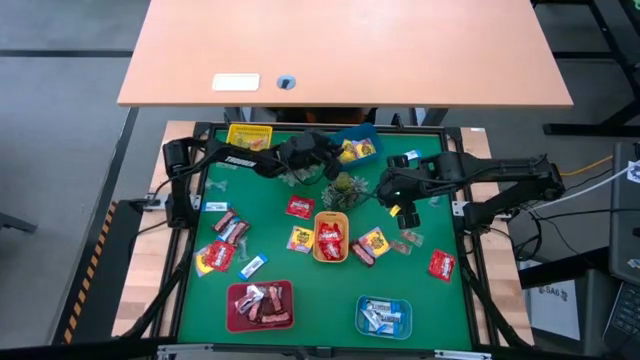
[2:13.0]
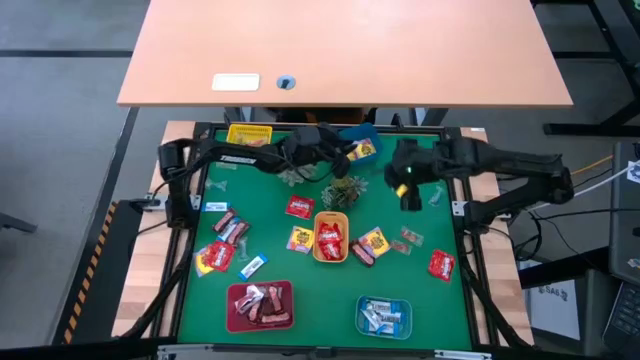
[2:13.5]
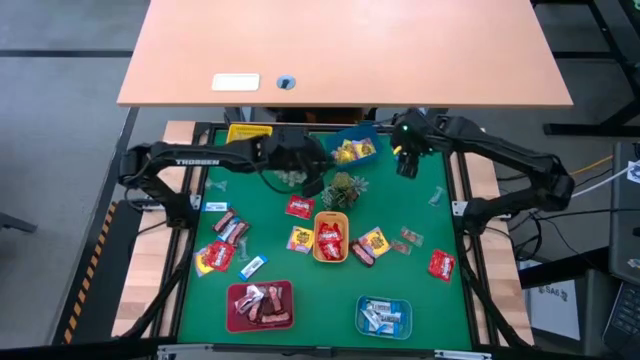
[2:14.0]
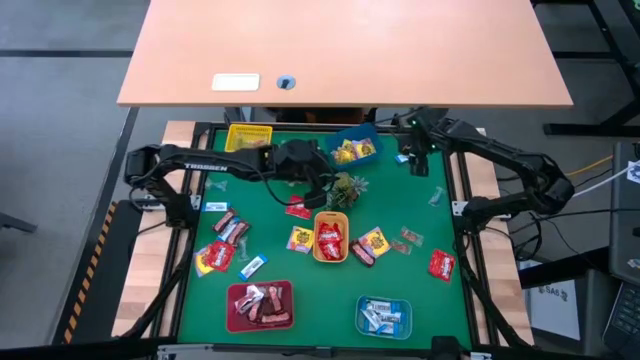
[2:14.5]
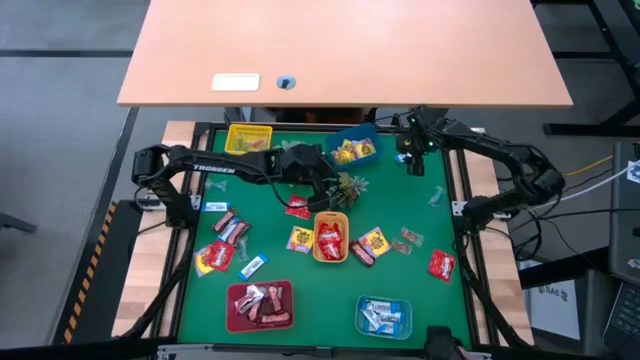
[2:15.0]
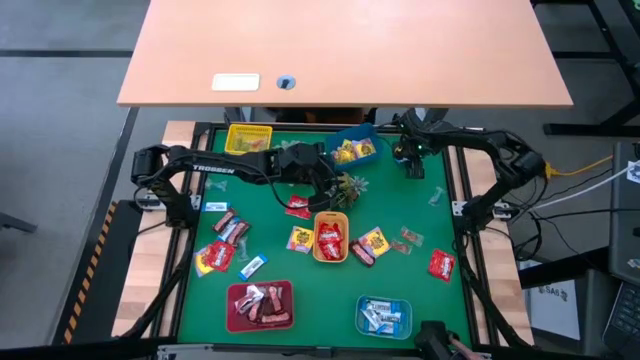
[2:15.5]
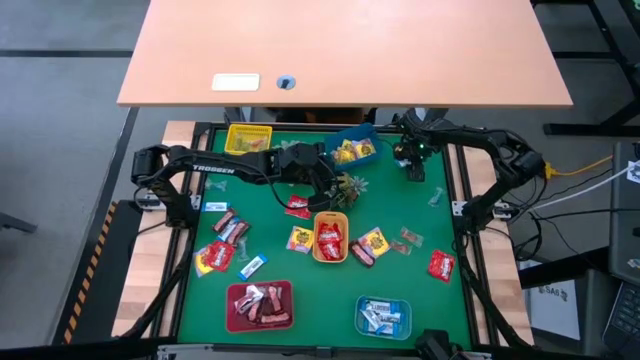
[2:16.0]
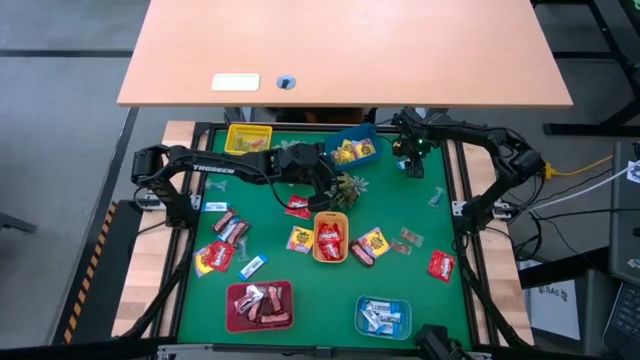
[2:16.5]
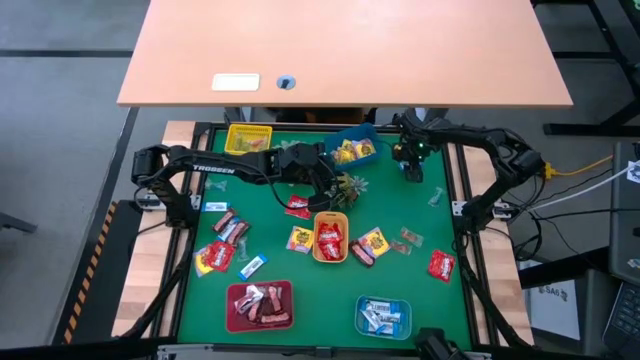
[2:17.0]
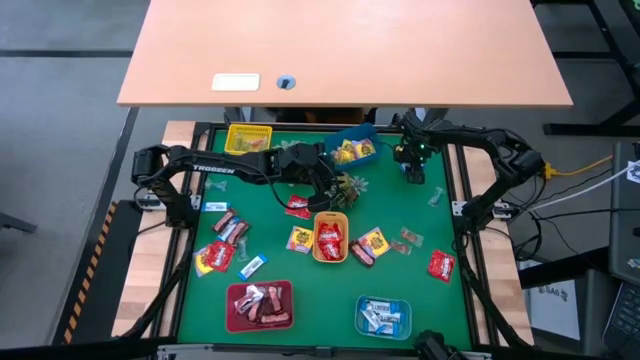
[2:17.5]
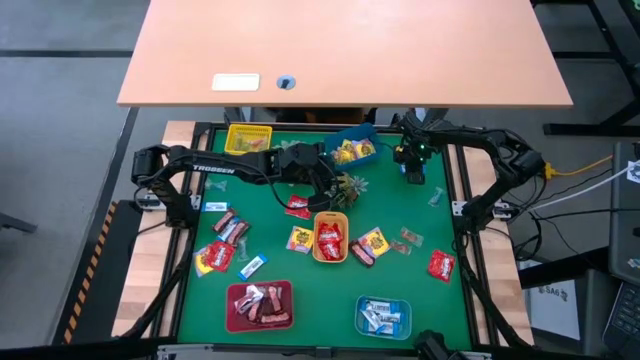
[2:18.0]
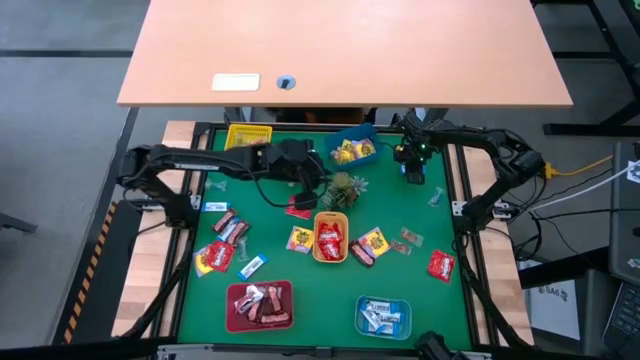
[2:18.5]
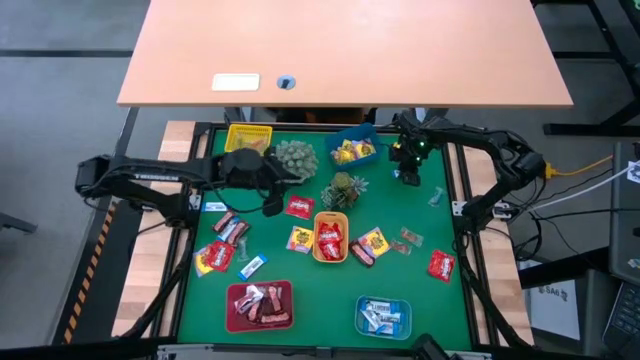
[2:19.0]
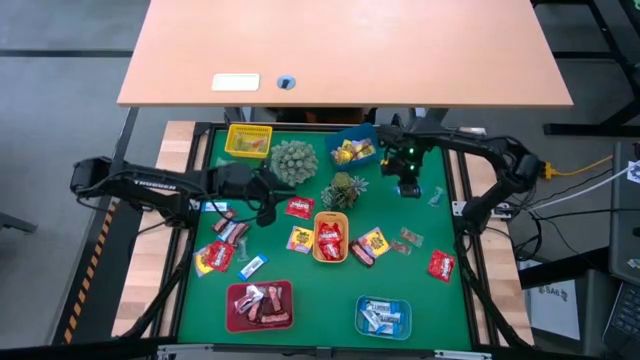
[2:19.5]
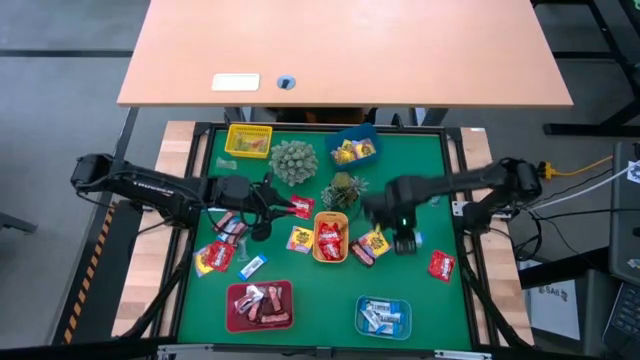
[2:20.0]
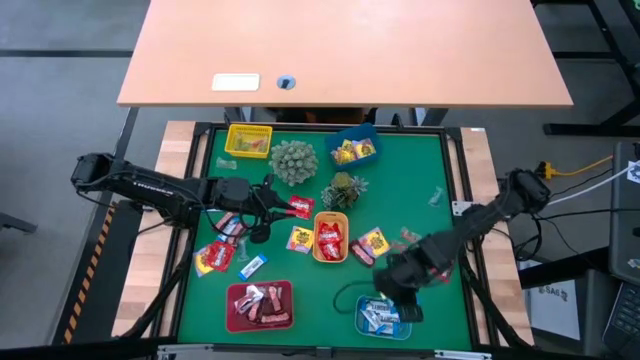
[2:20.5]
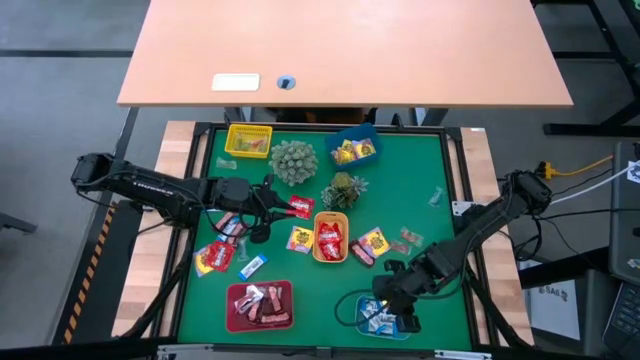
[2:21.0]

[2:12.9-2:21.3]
Task: Sort candy
Put the blue chocolate bar into the light blue bin

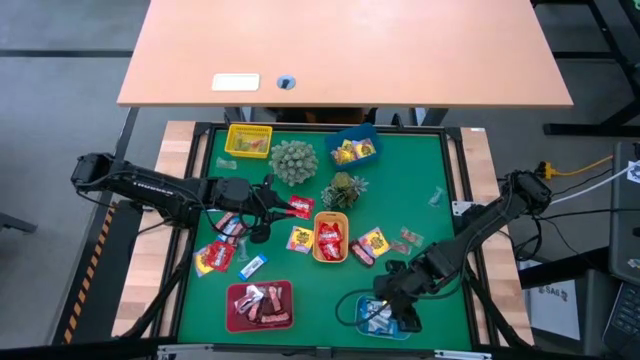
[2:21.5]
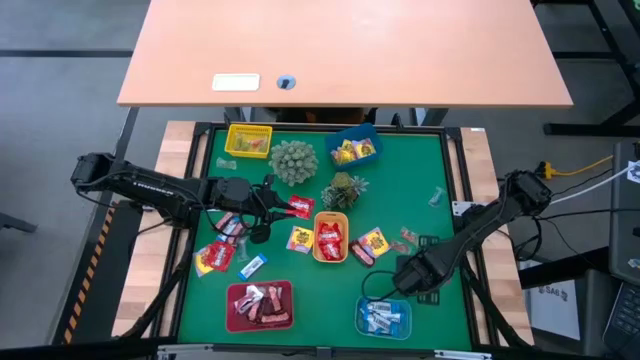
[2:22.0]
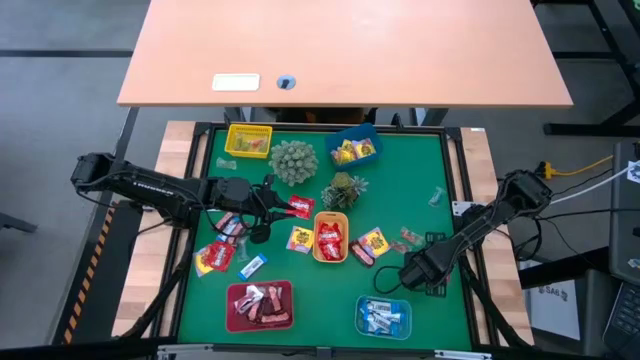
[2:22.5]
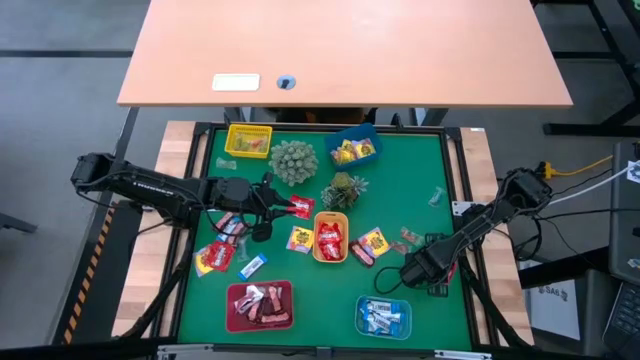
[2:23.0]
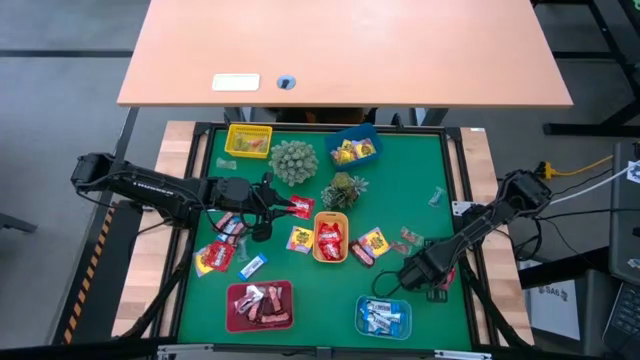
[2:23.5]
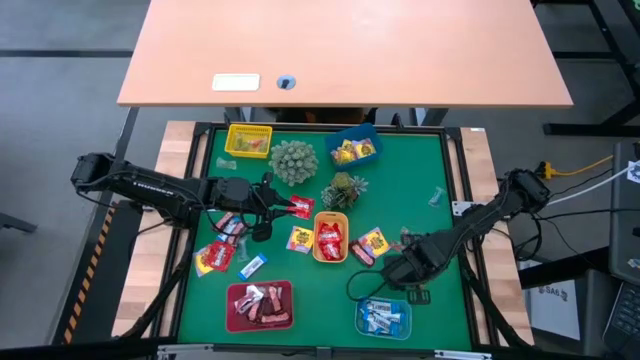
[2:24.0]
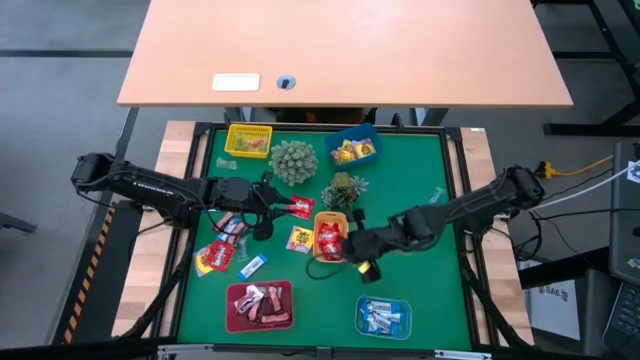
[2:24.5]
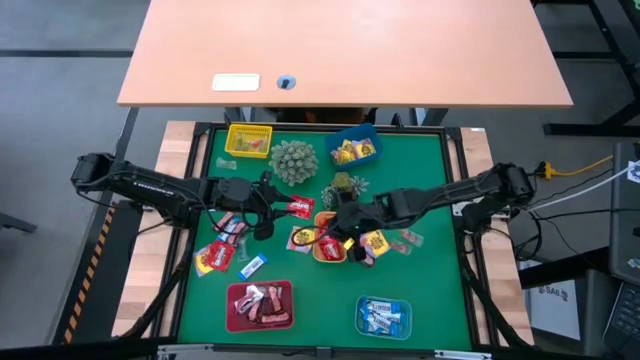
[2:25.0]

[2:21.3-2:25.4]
Put the red candy into the light orange bin

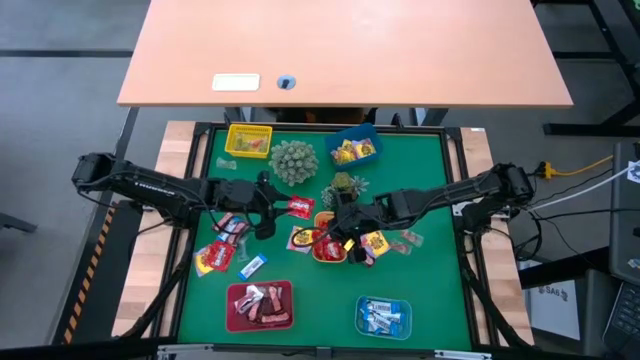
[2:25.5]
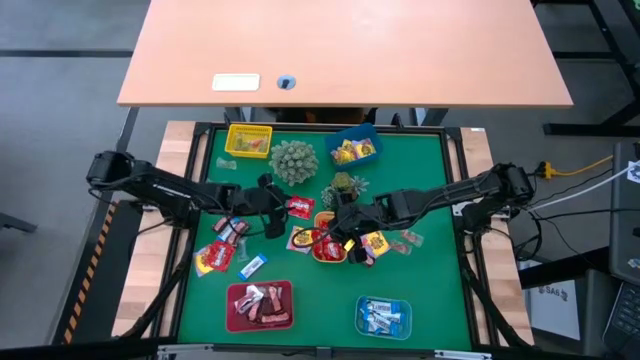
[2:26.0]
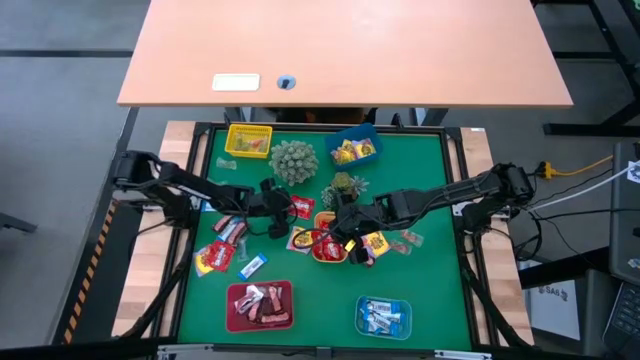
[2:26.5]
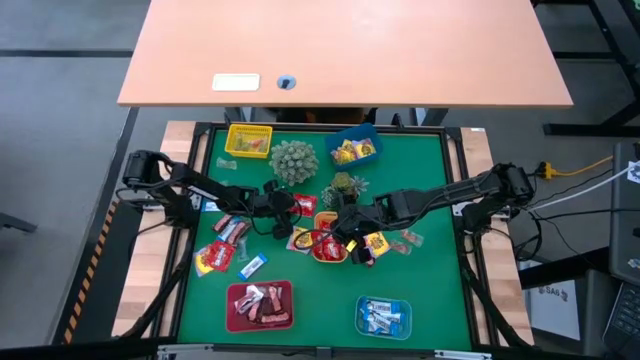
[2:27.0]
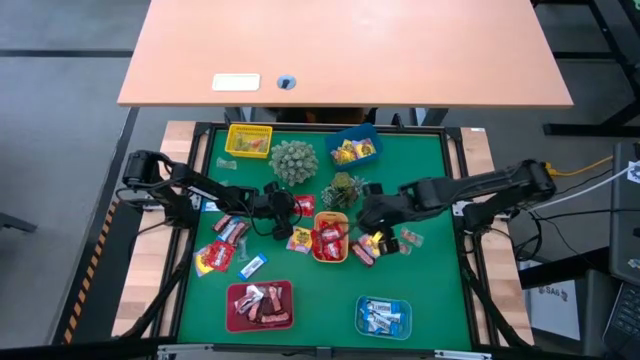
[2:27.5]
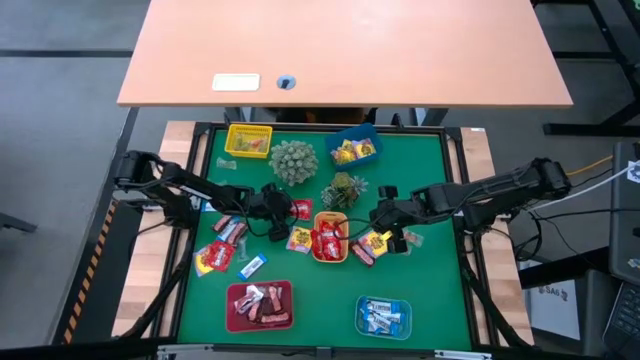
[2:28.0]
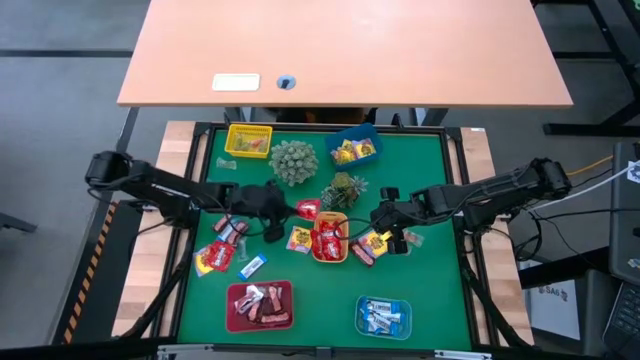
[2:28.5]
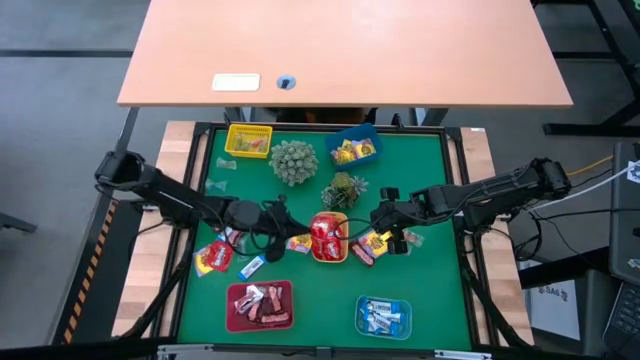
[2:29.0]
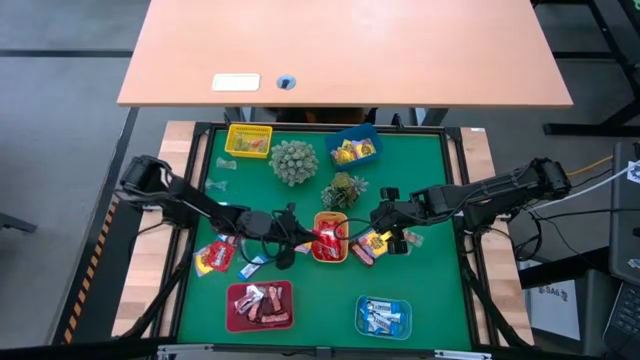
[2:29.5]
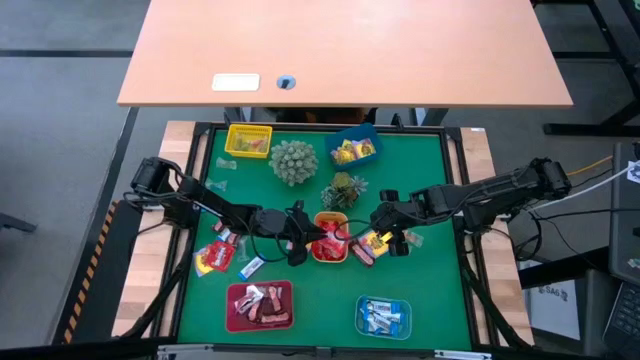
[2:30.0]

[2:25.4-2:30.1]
Put the red candy into the light orange bin

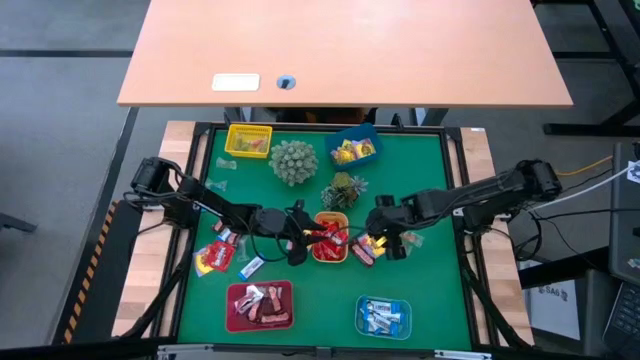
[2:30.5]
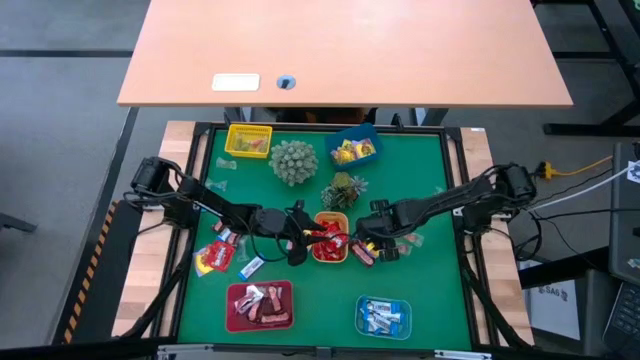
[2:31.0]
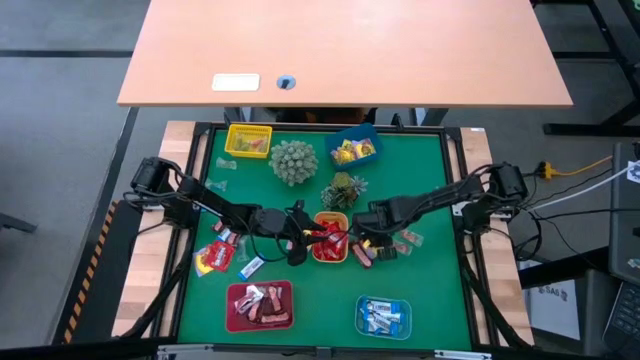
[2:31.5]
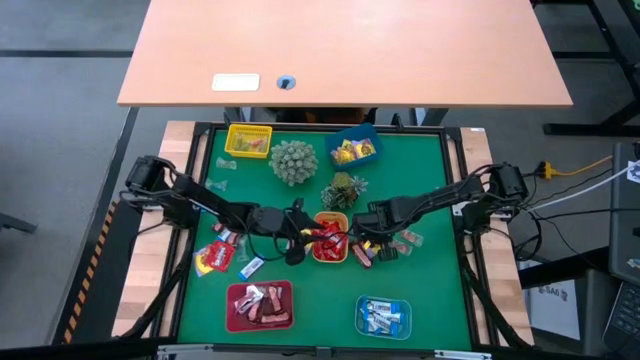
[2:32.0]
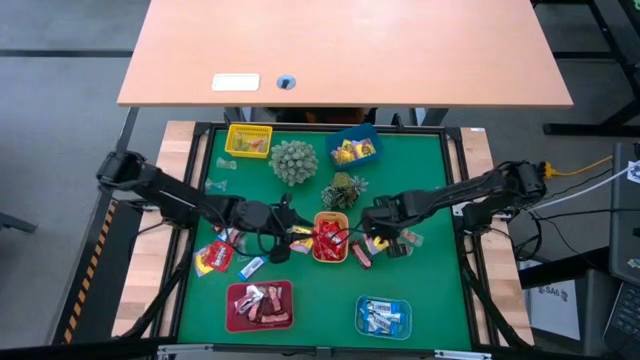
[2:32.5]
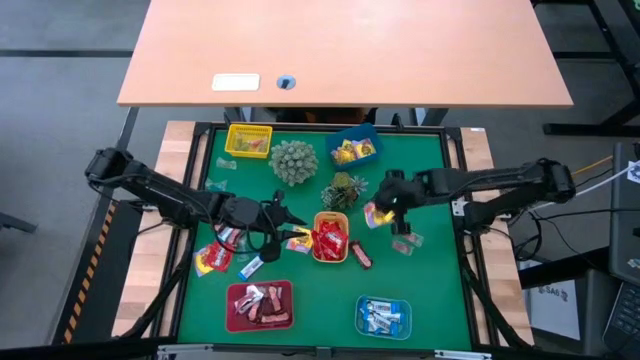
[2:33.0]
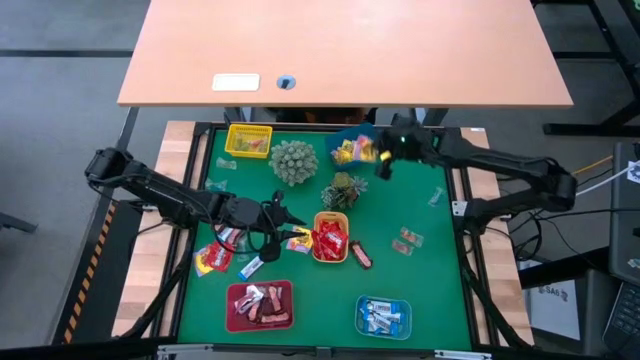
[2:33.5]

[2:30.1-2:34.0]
Put the yellow candy into the blue bin
